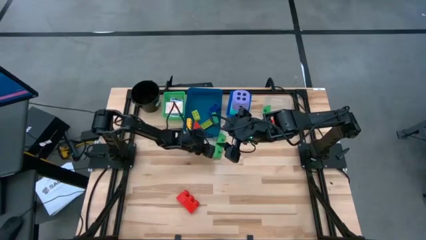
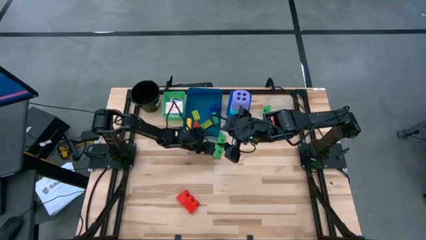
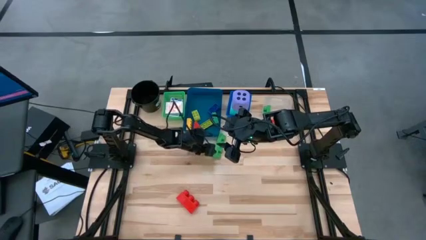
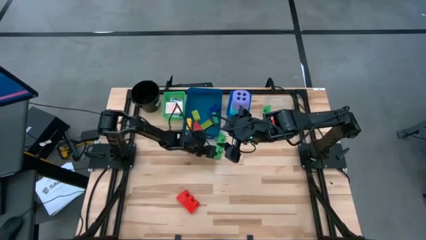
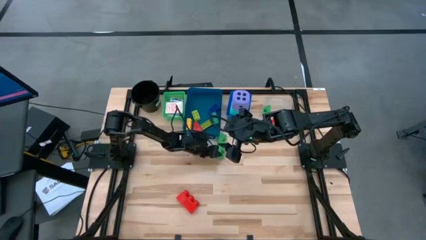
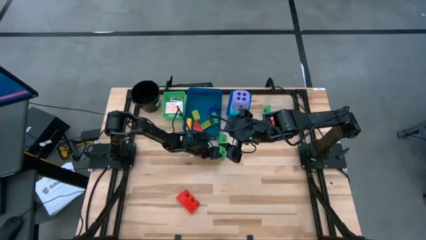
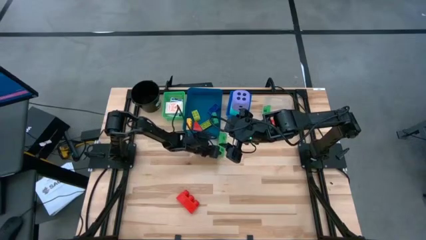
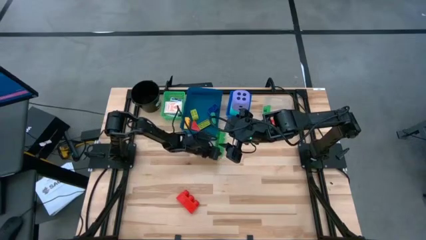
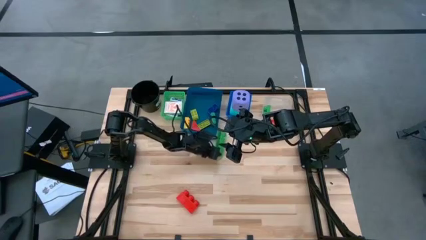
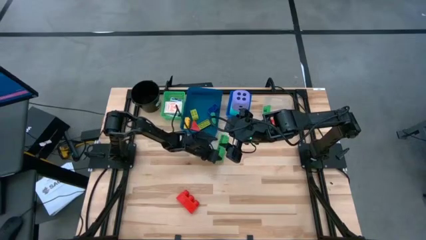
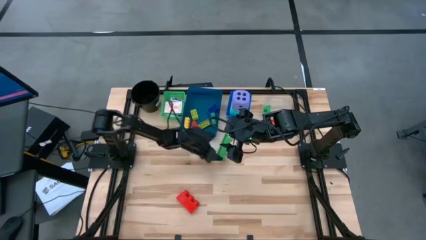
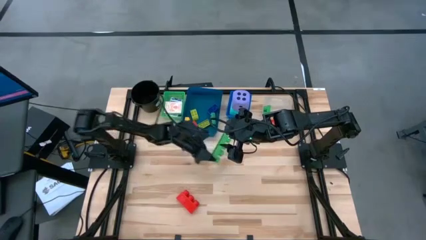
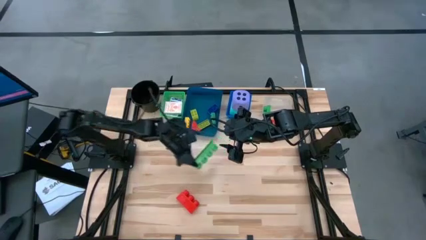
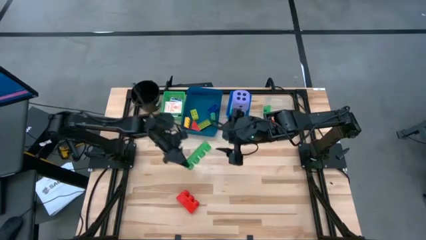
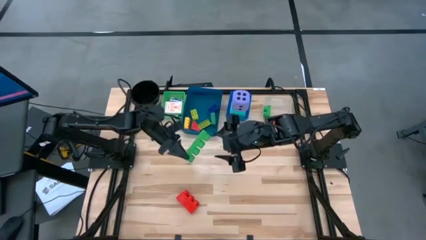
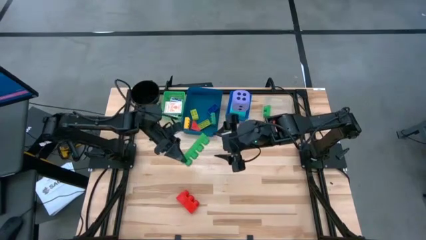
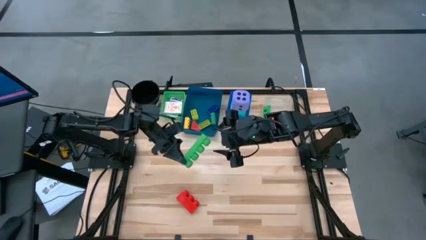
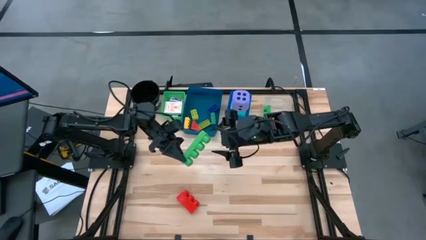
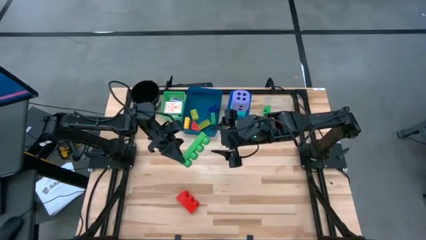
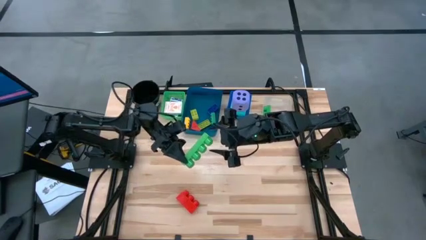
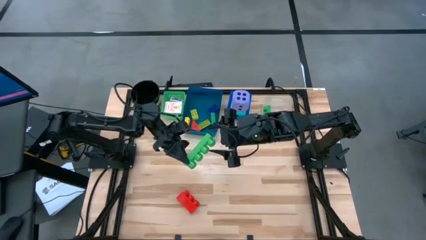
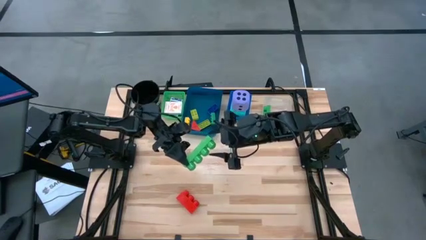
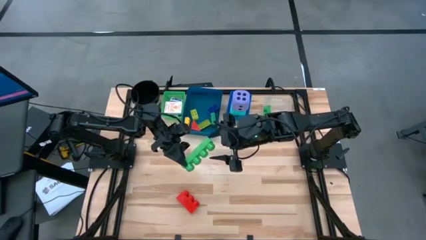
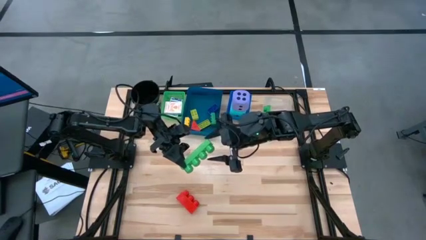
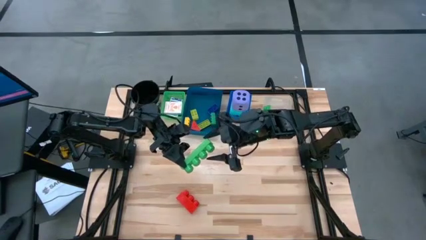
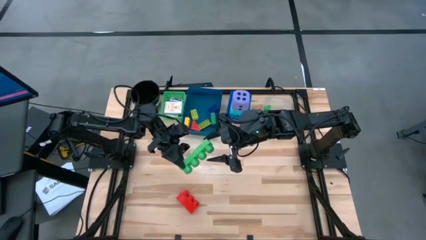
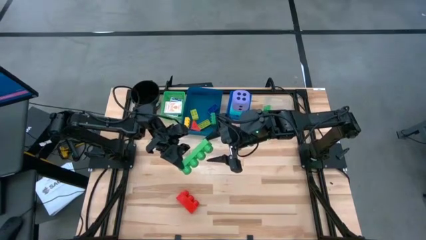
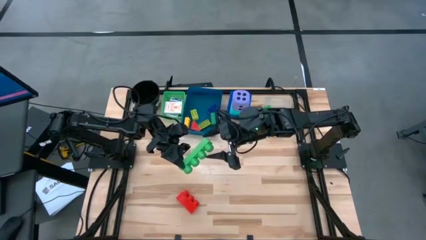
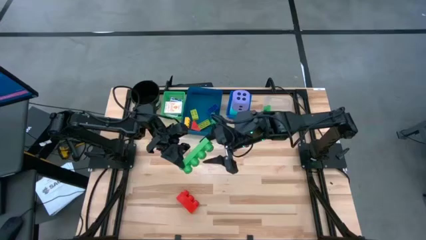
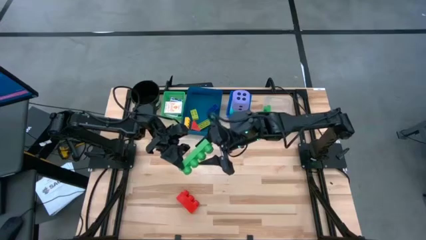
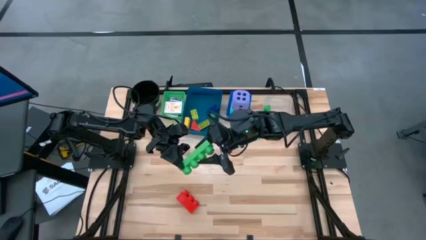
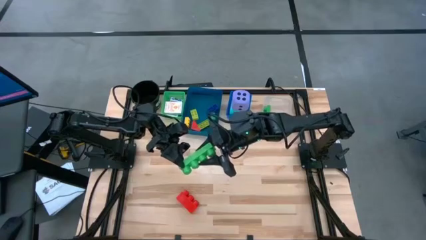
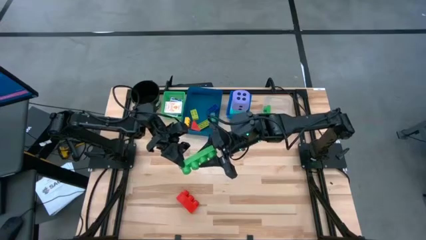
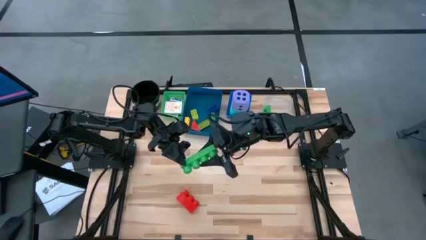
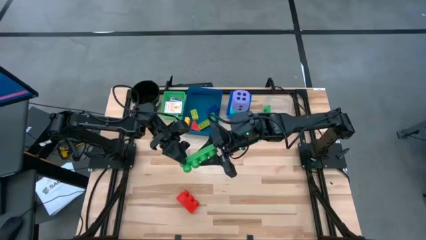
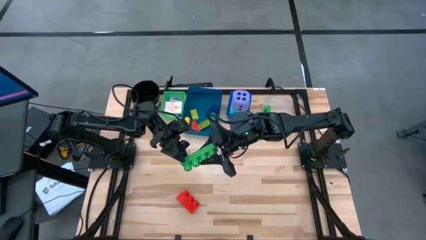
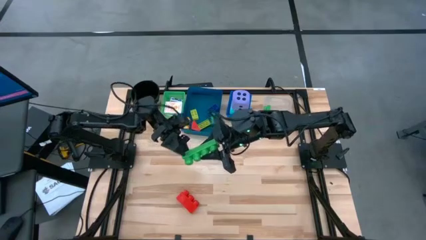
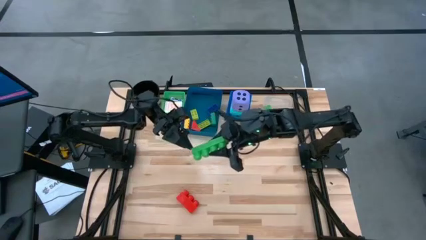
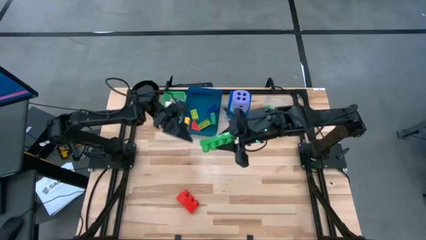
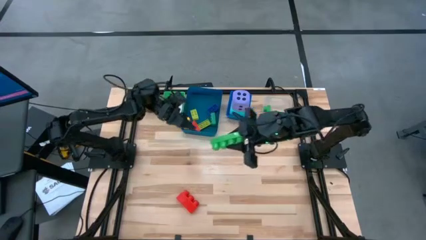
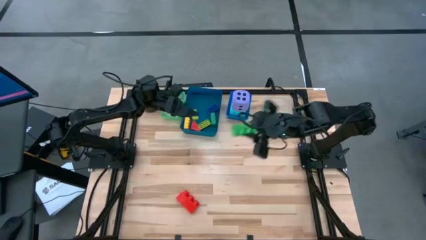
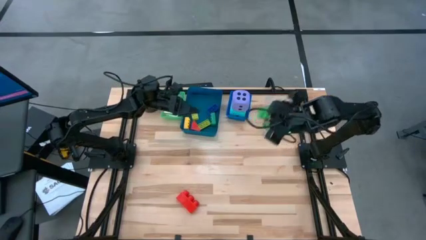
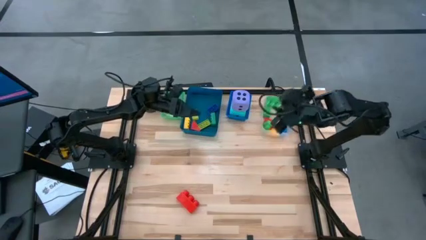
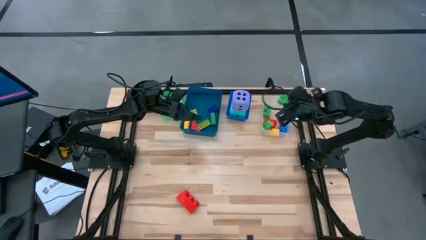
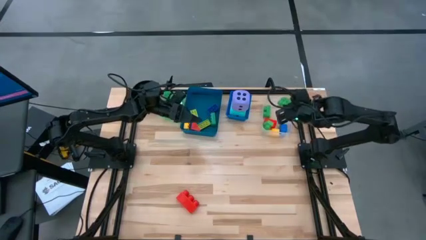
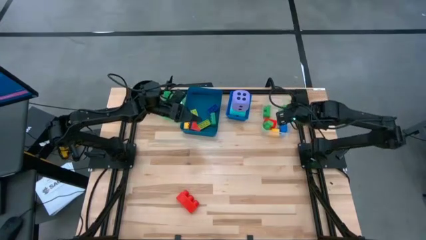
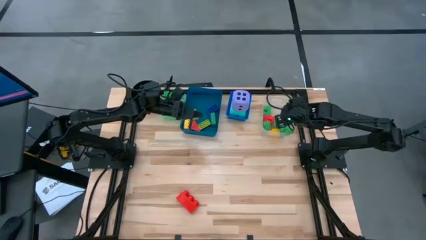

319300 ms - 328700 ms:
Task: Pick & Place Toys
Put the large green game piece into the transparent bin

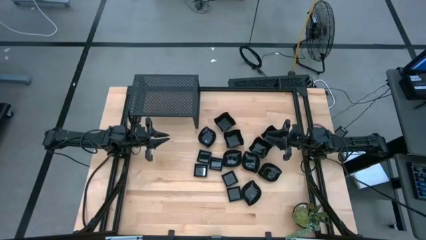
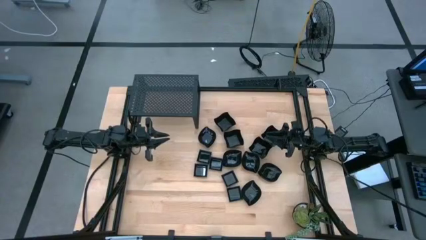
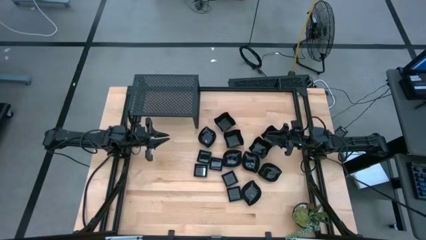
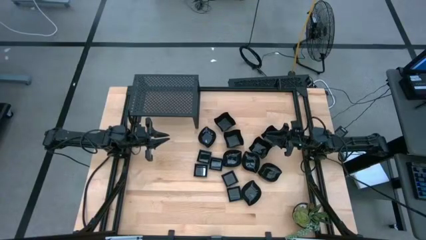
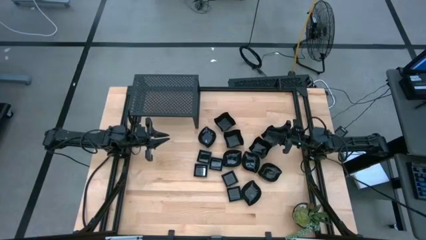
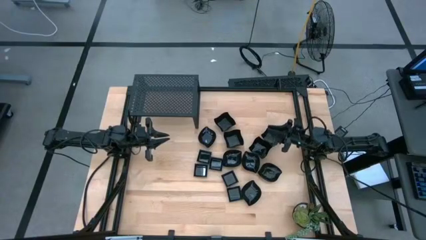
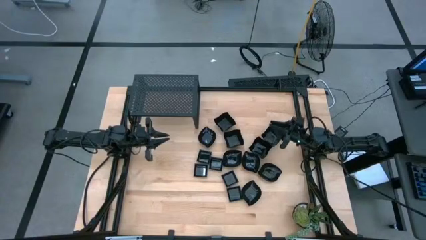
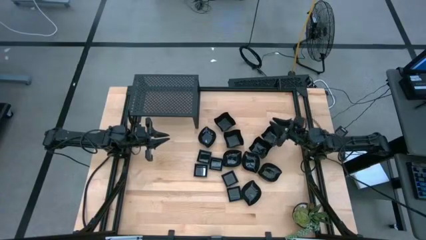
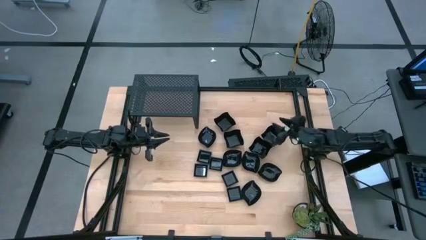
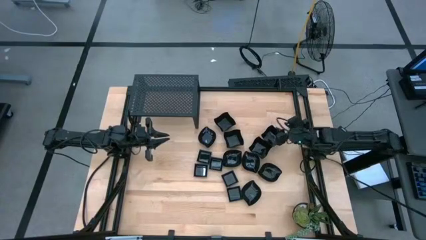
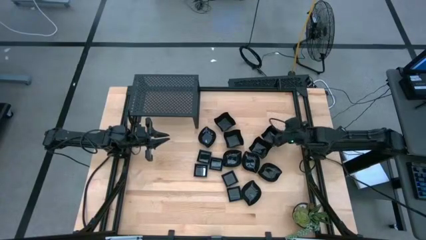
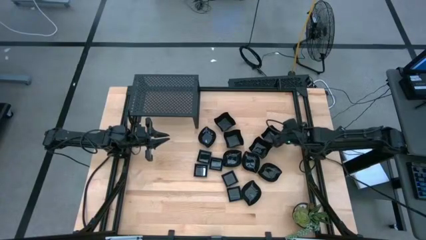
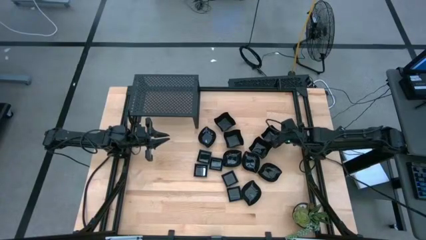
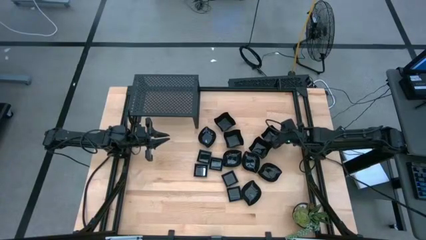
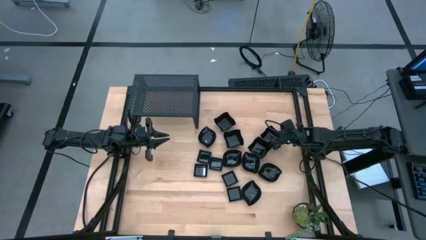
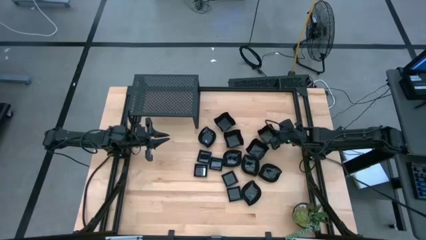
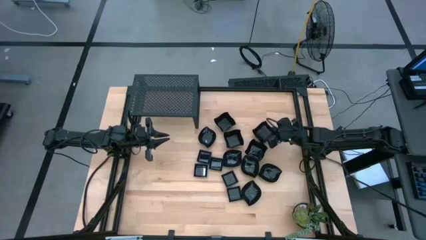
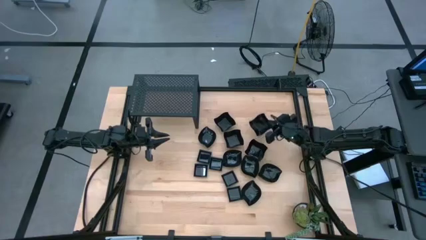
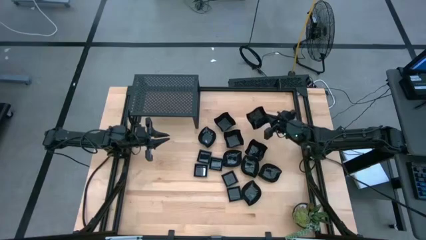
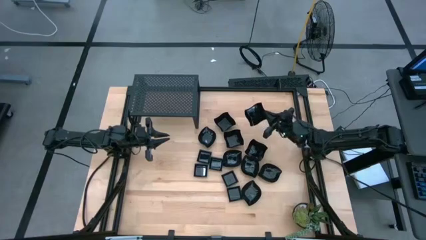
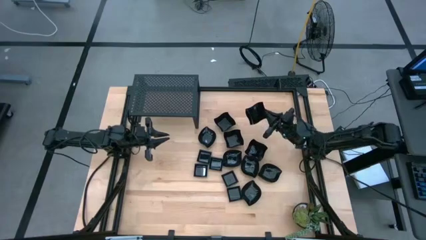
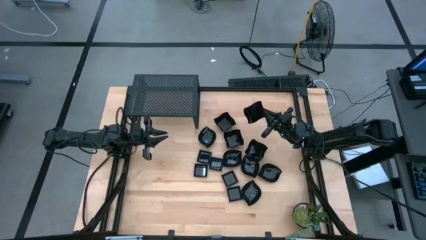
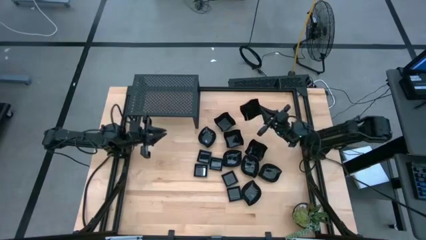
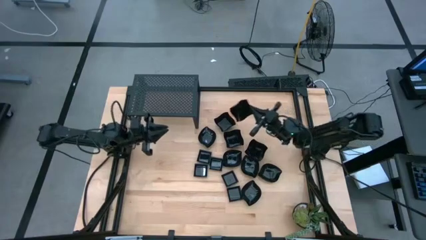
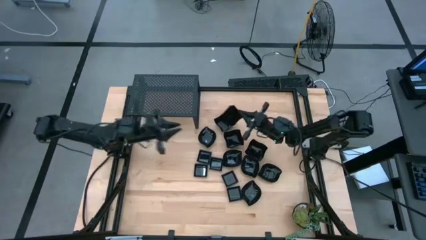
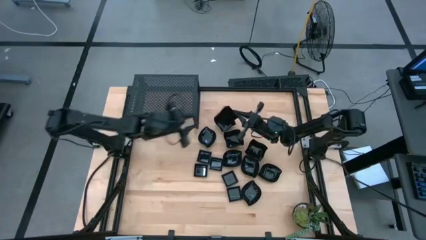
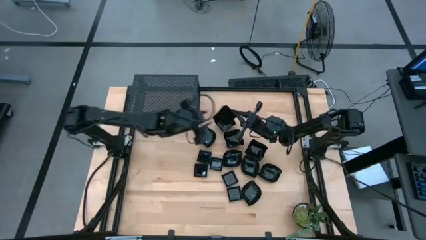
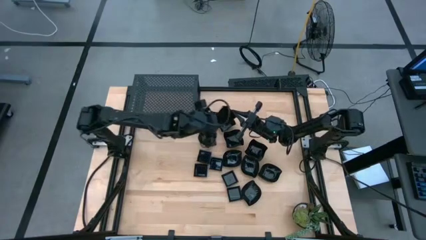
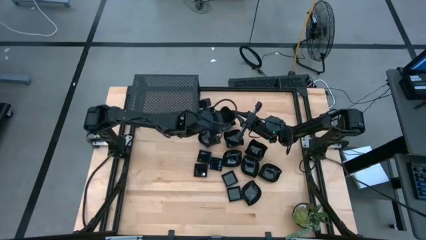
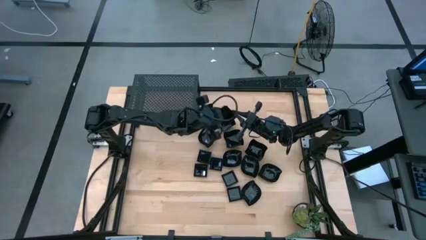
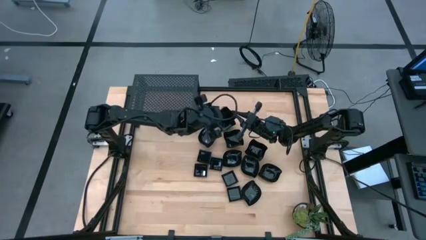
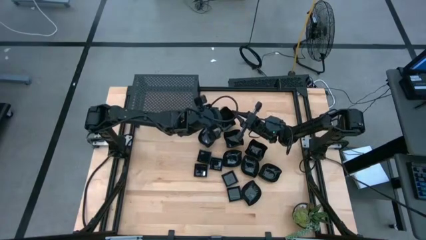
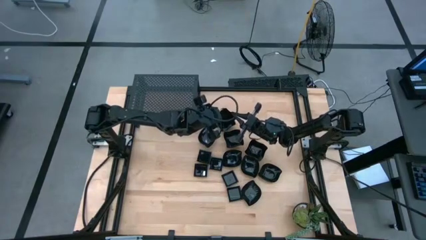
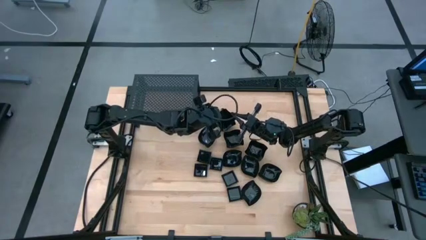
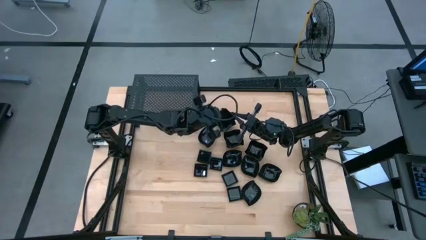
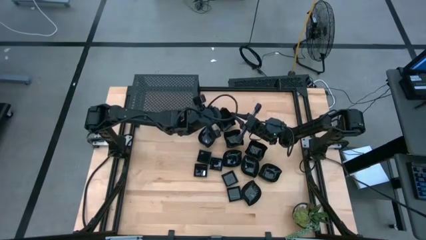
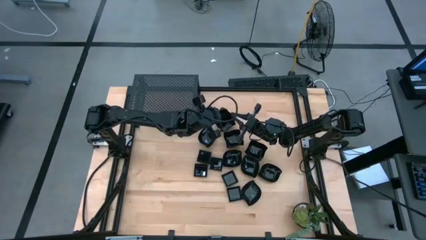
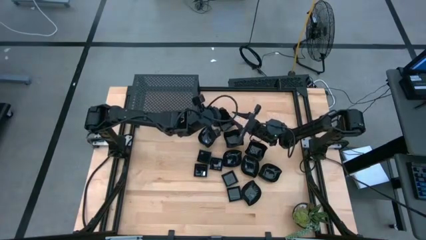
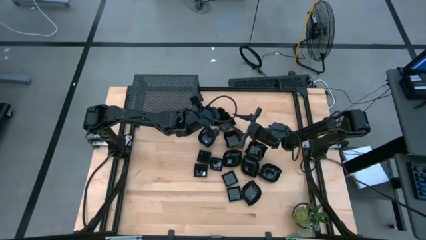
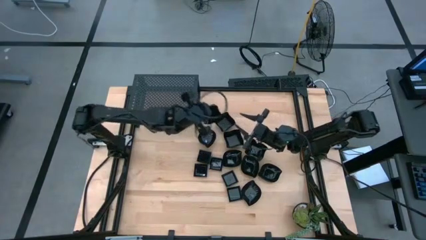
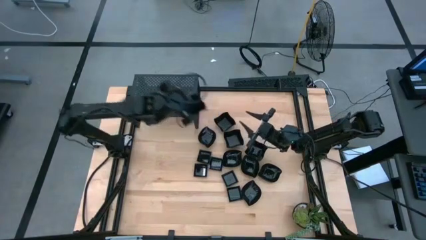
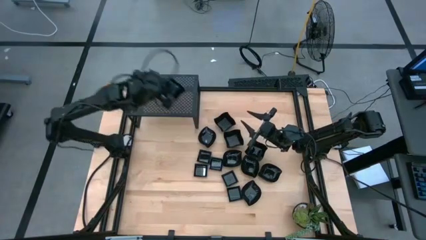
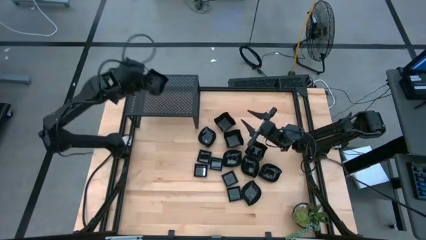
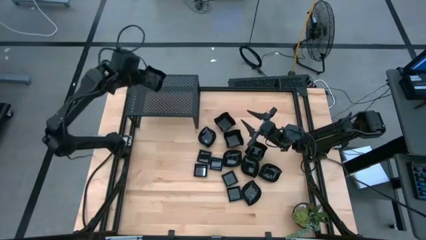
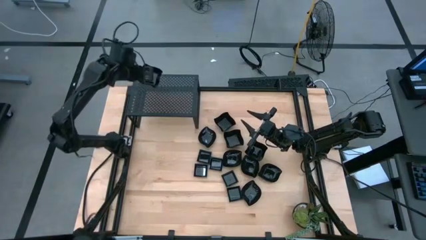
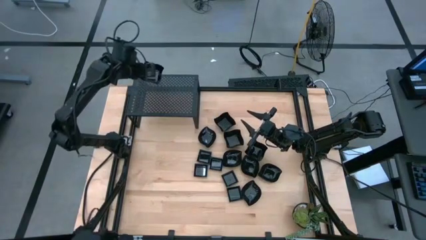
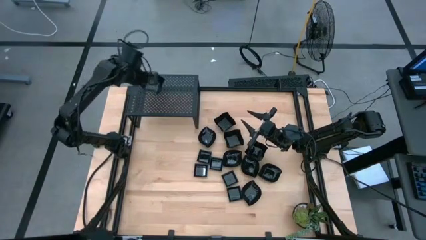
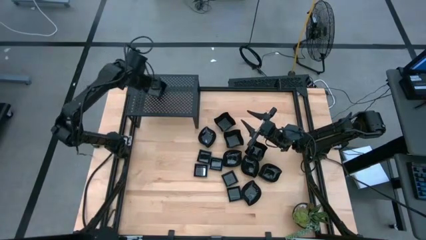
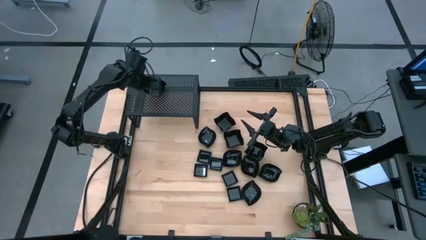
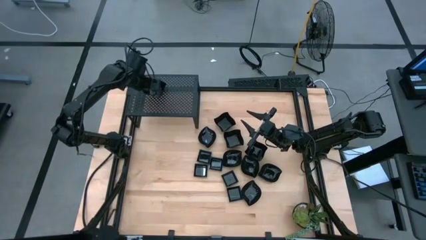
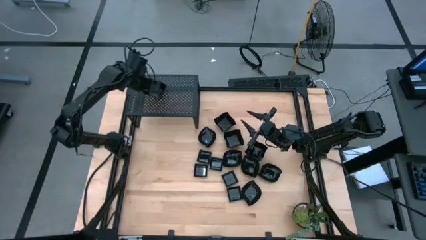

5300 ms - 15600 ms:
Task: Pick & Place Mini shaped plates
Put the distorted square plate on the shelf
